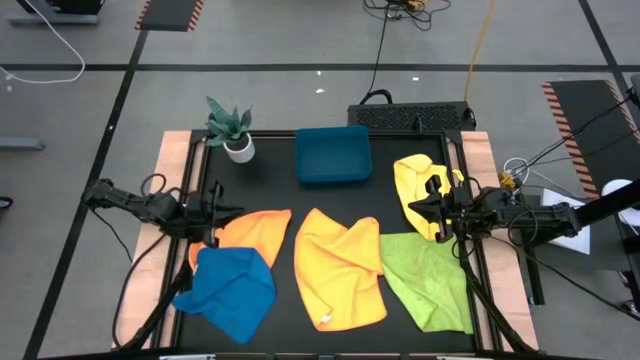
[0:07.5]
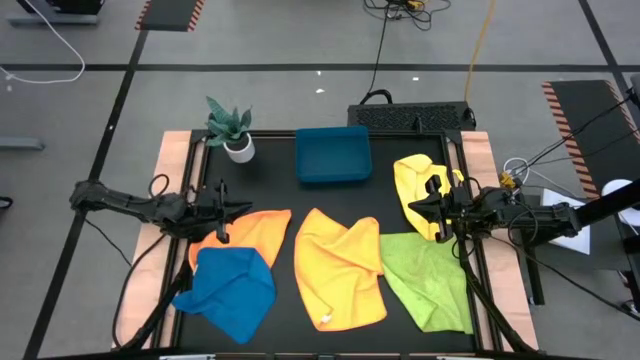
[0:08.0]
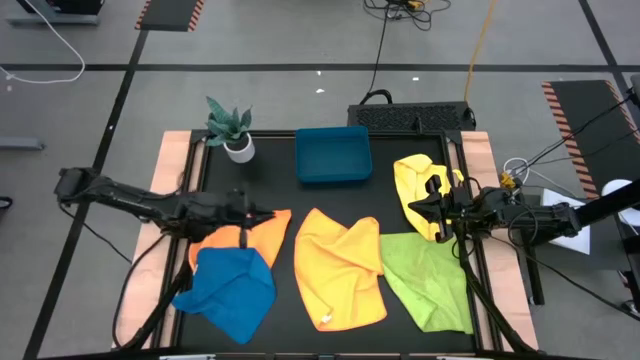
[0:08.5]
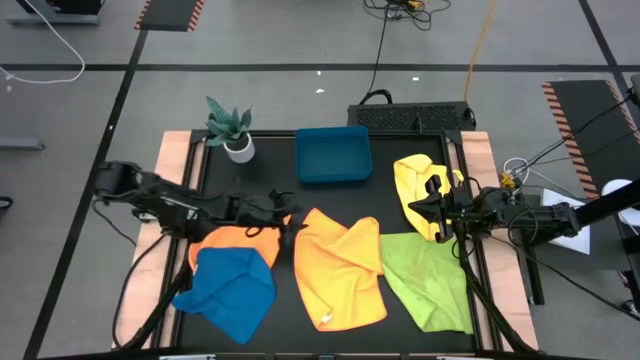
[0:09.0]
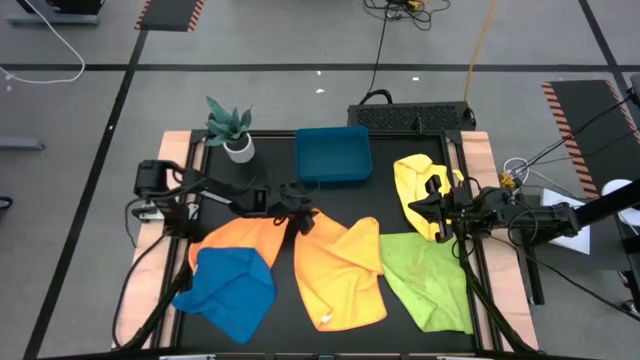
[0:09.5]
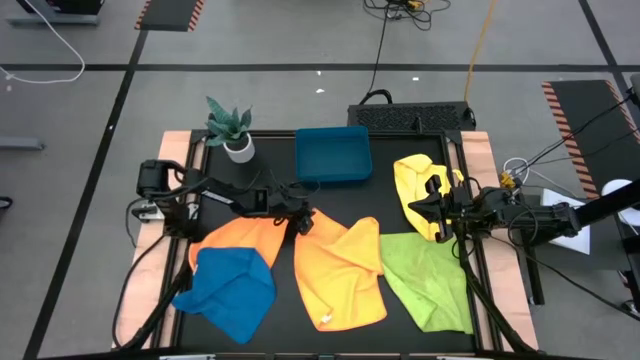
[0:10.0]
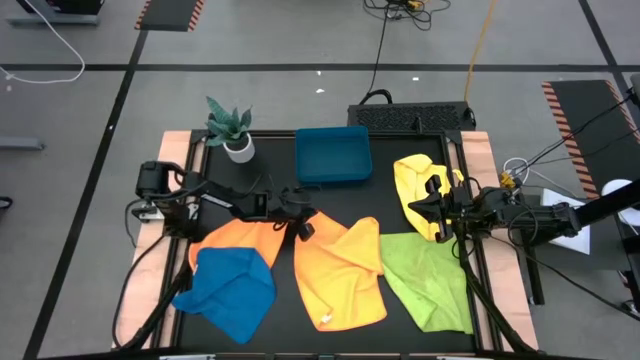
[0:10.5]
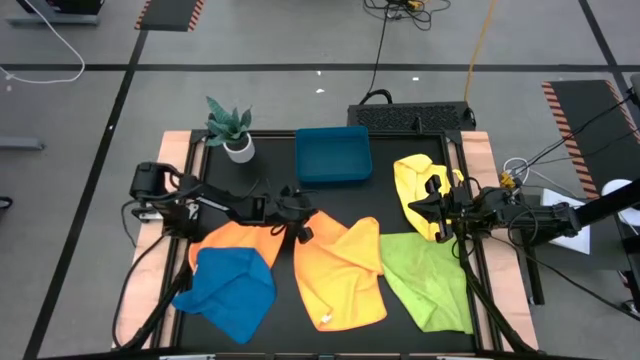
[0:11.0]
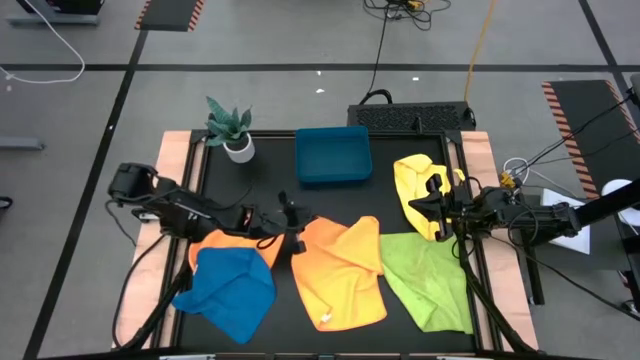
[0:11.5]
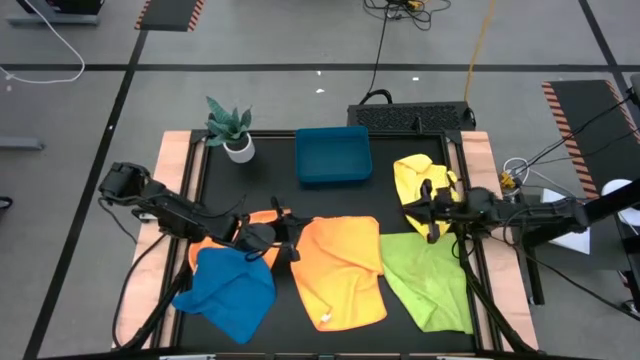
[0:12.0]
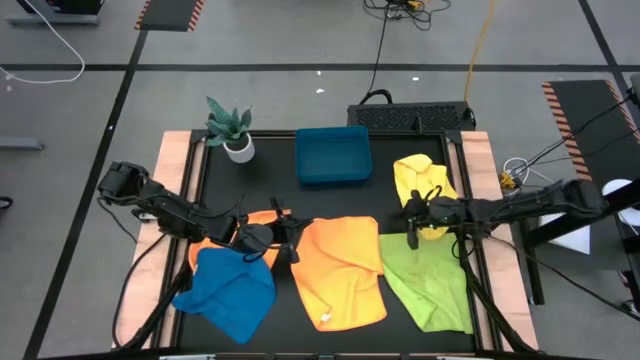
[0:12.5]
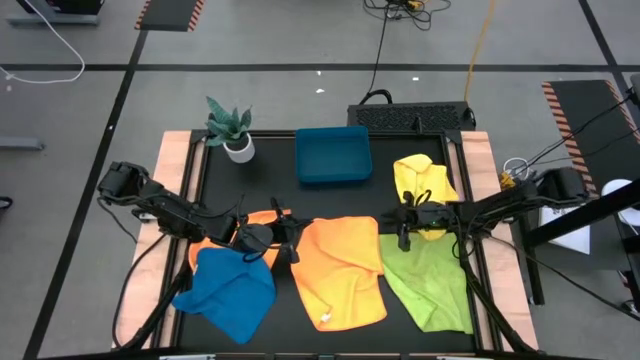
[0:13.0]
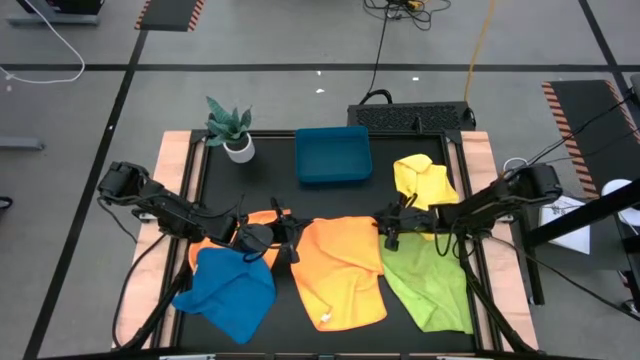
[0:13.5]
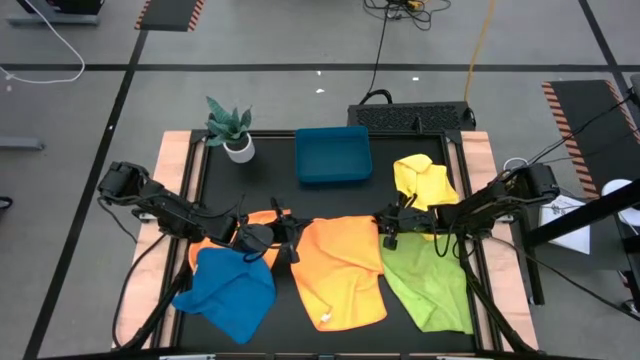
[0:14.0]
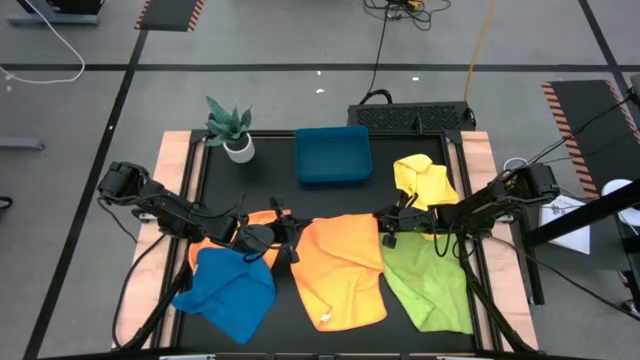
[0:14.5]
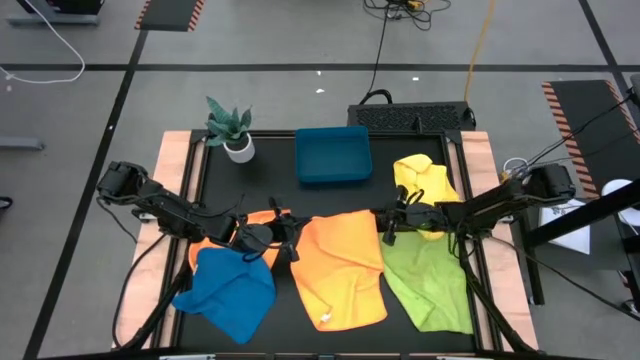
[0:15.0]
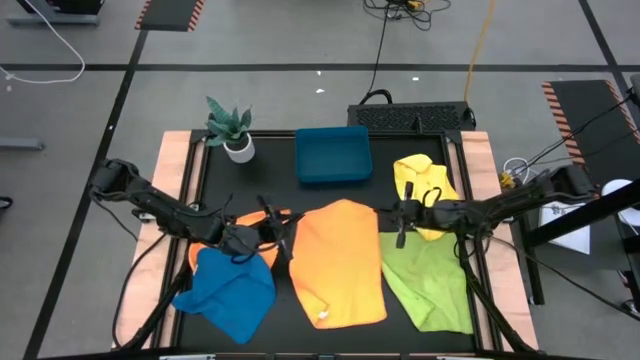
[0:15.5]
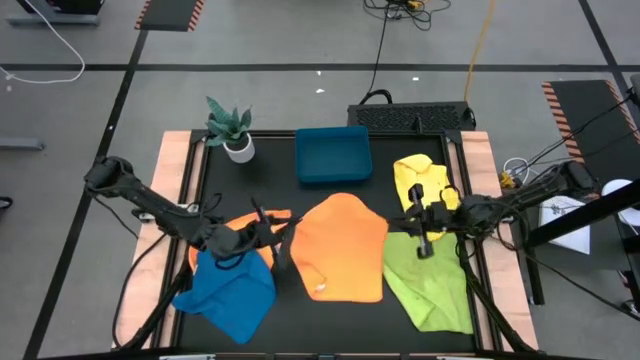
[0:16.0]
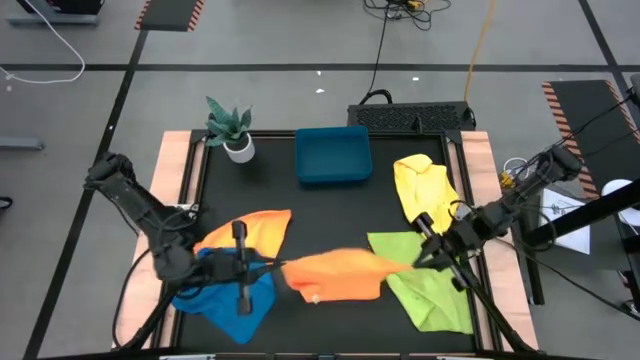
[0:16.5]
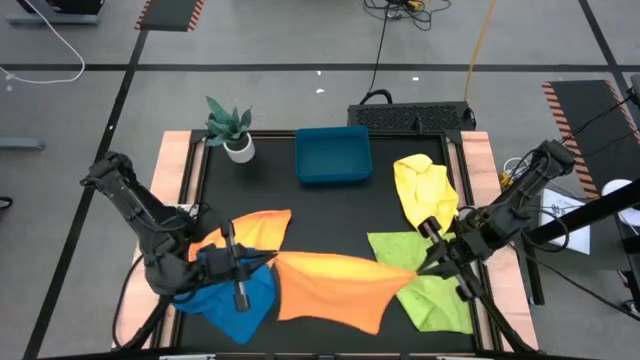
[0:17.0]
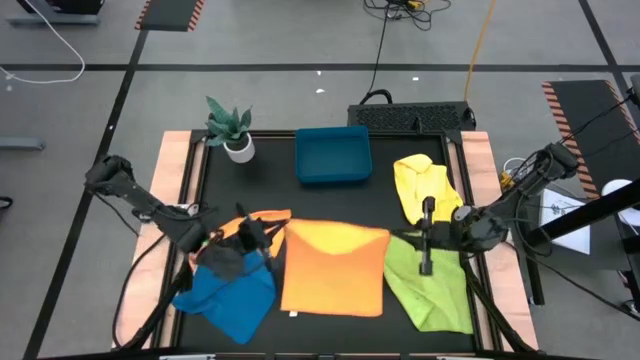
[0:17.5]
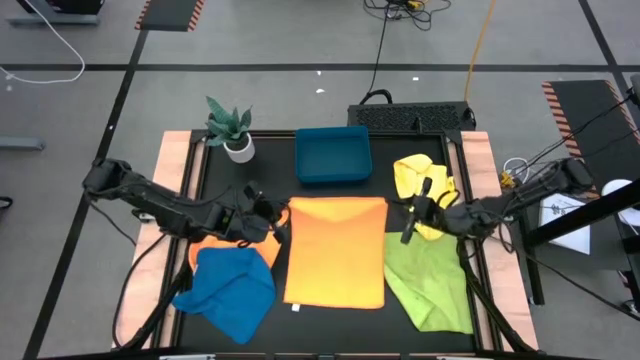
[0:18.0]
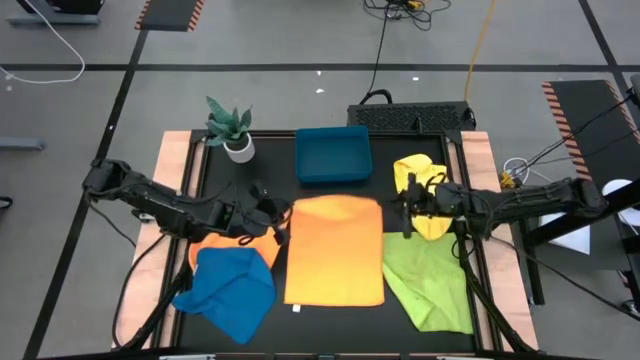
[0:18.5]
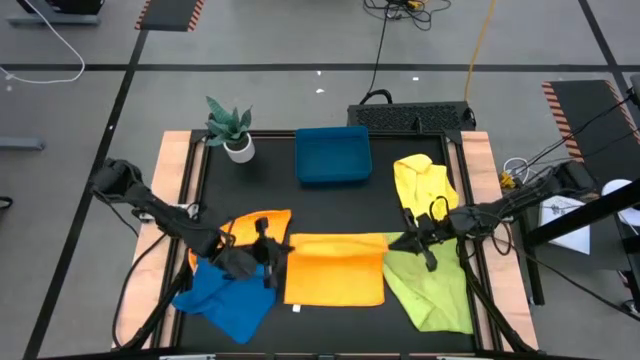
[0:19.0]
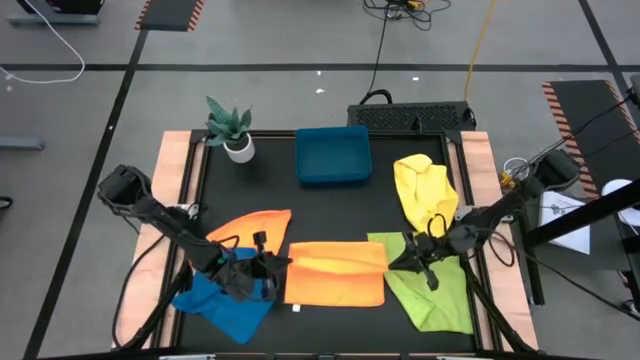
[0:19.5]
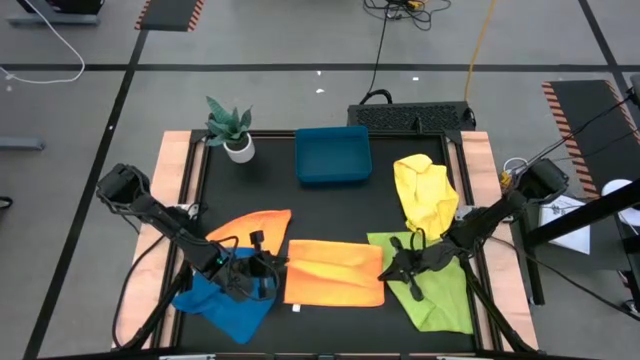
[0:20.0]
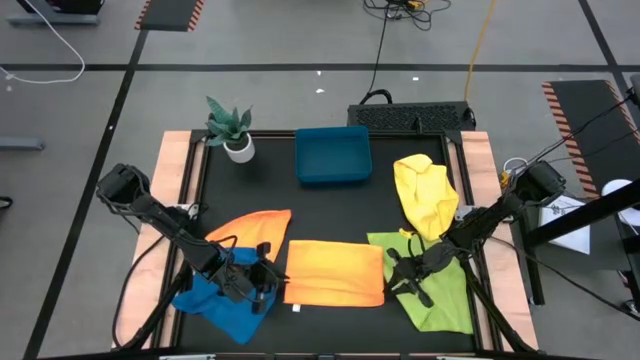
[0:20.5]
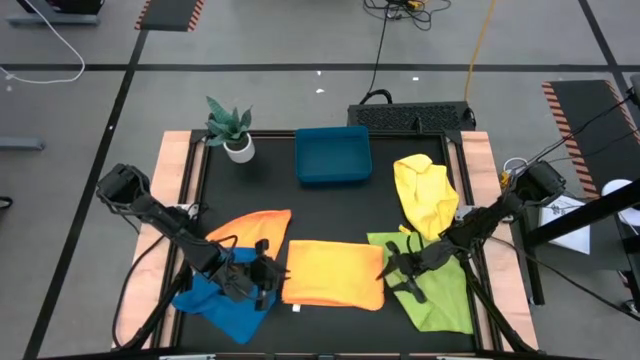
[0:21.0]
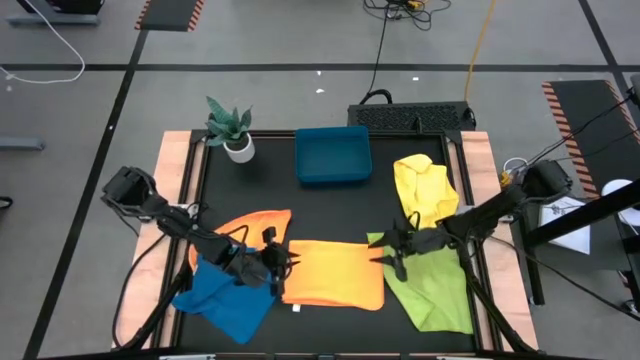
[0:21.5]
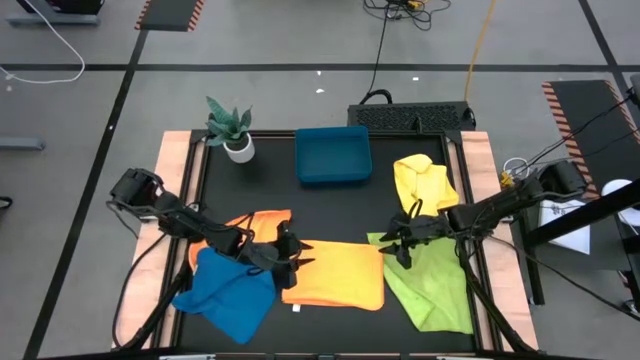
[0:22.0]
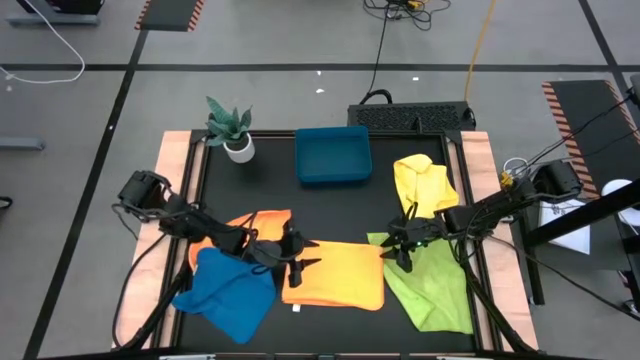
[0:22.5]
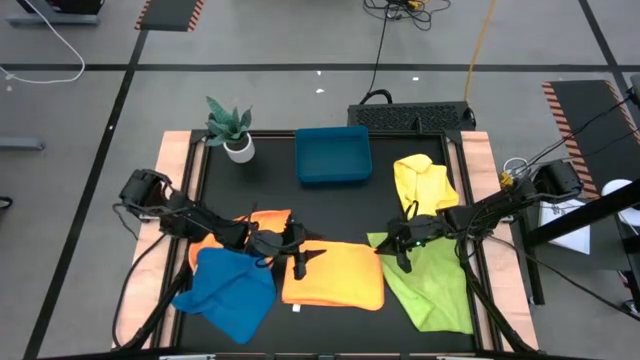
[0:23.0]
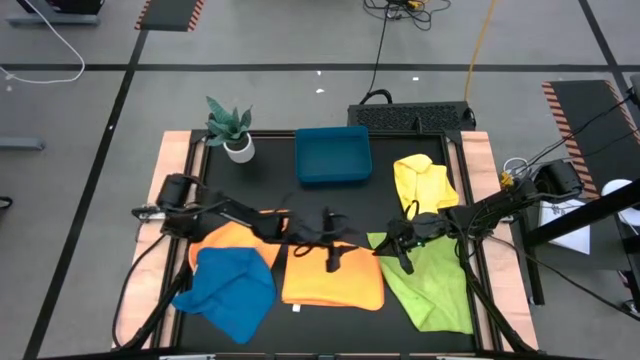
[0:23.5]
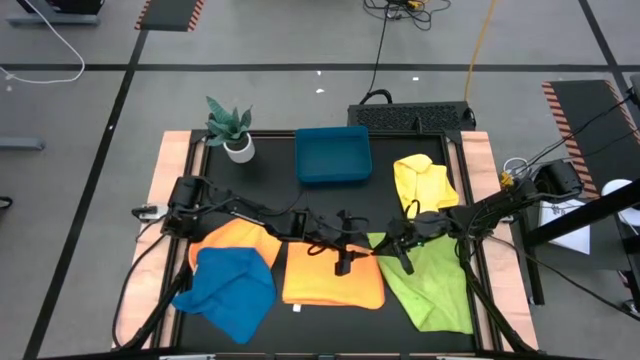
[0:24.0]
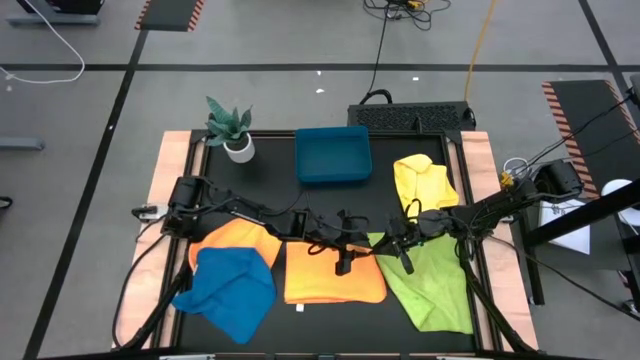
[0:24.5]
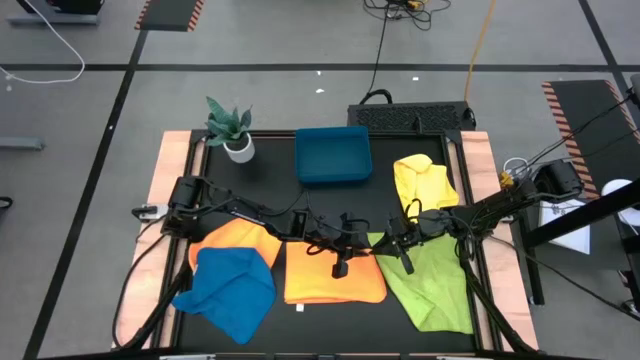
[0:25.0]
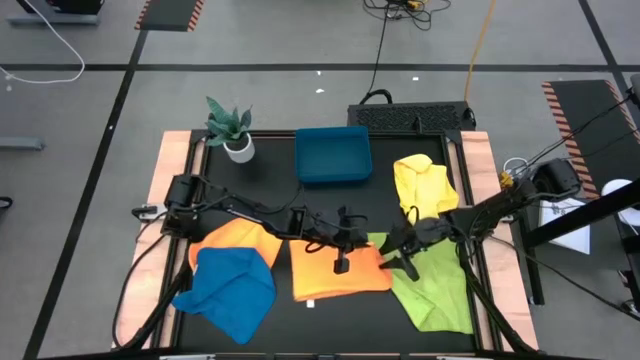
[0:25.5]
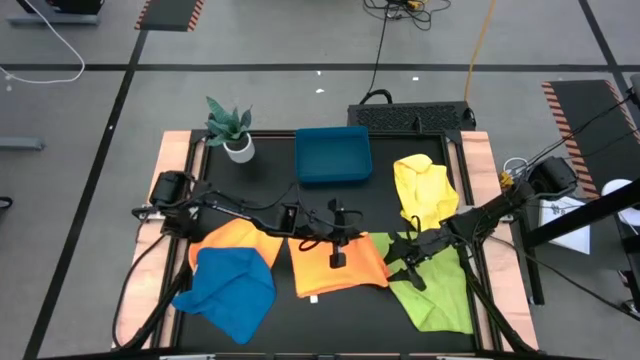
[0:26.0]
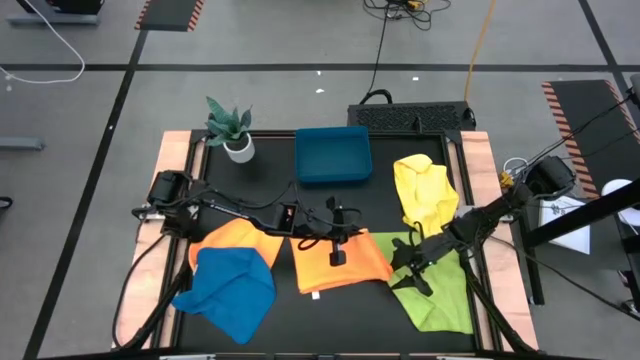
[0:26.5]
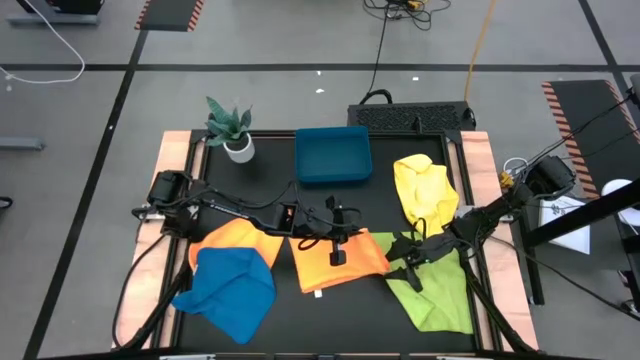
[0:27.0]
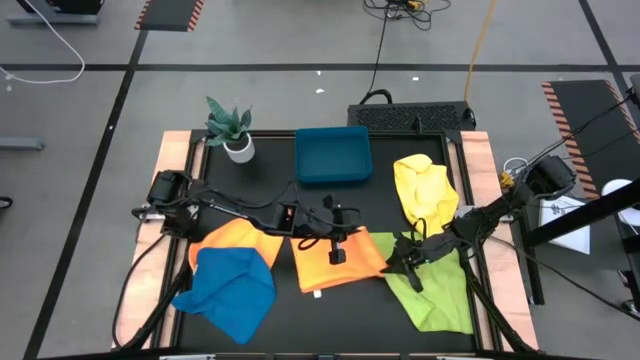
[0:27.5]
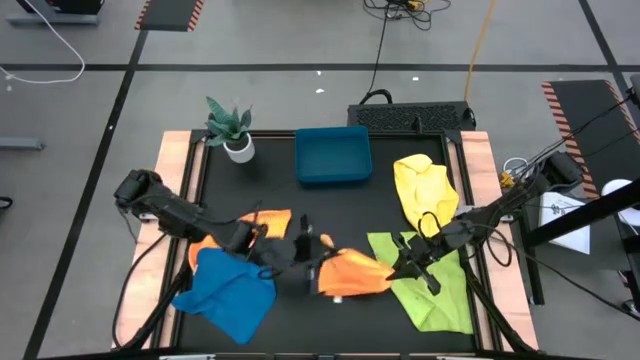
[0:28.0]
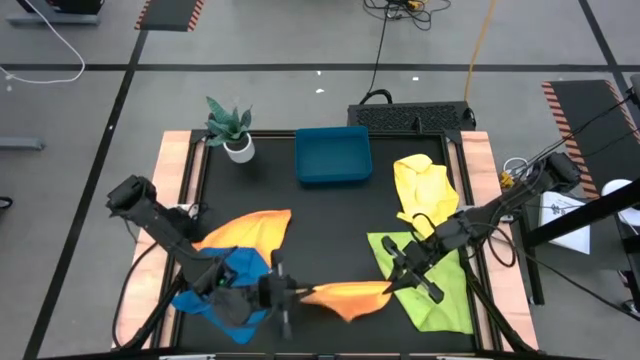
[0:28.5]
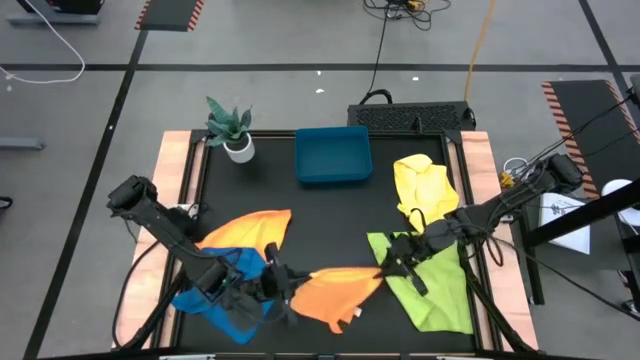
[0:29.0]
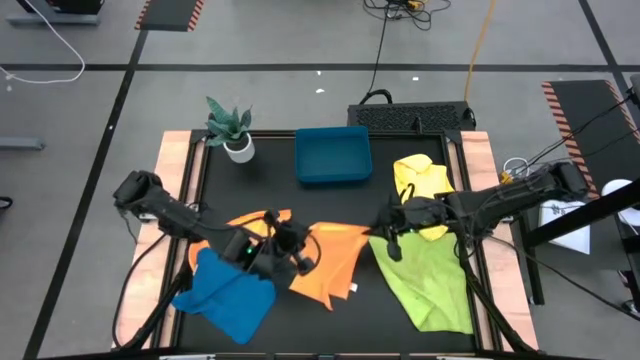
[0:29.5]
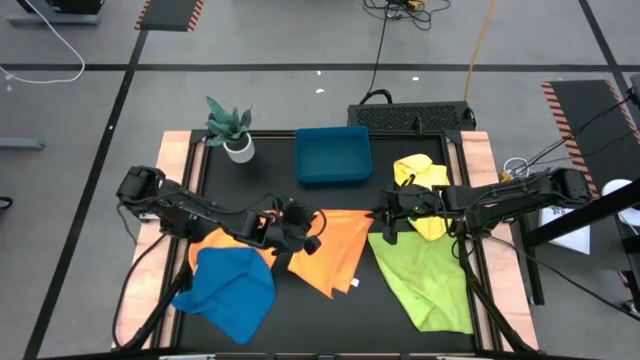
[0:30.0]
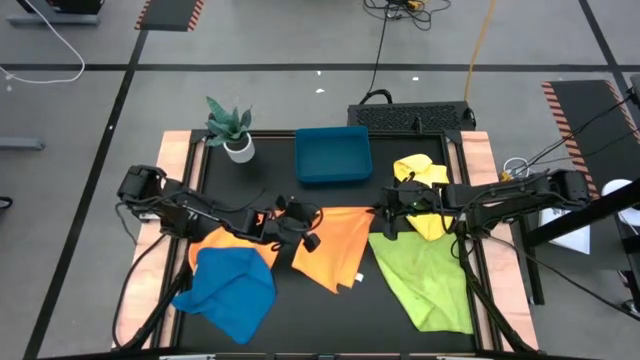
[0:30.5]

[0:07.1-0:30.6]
Task: Fold microfiber towels
Fold the right orange microfiber towel
